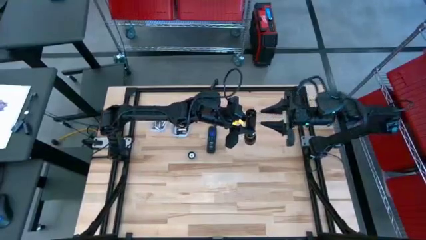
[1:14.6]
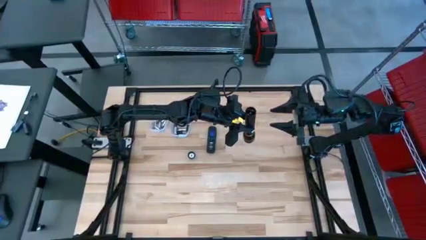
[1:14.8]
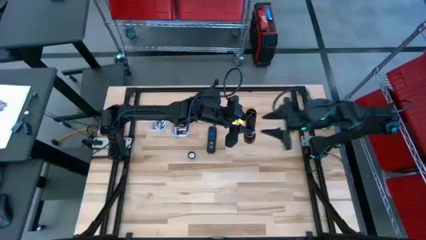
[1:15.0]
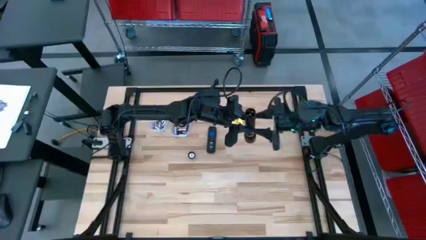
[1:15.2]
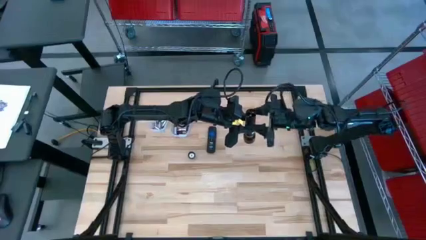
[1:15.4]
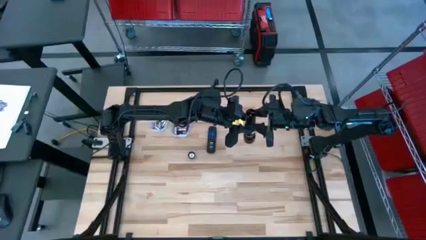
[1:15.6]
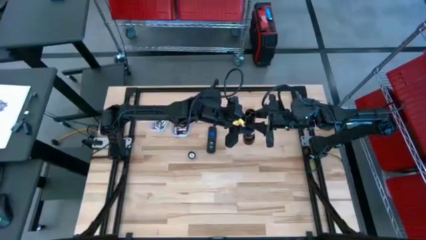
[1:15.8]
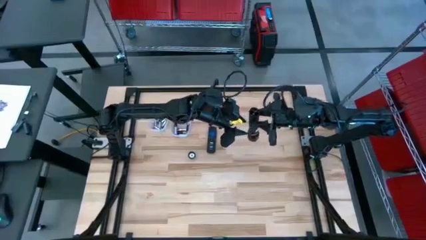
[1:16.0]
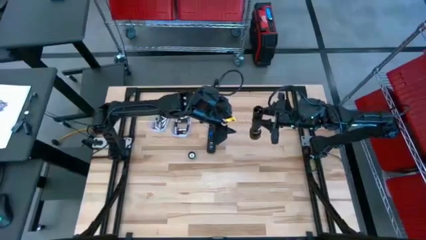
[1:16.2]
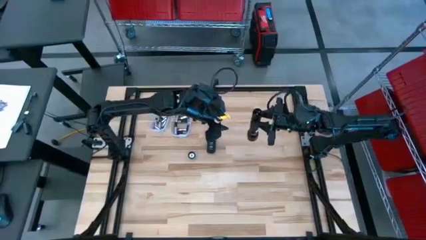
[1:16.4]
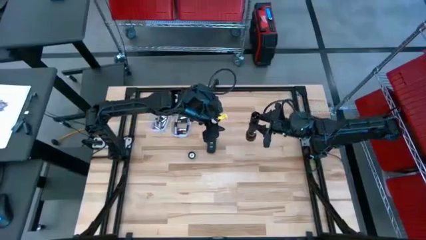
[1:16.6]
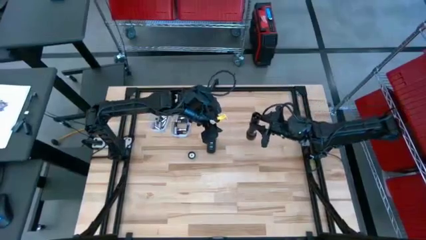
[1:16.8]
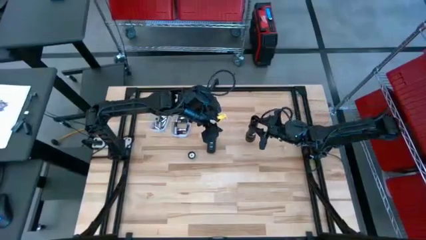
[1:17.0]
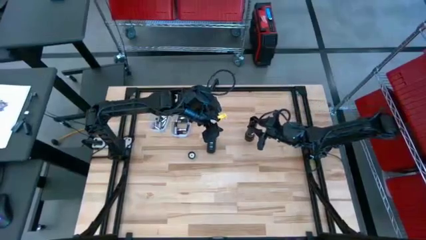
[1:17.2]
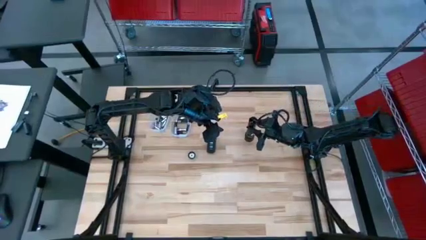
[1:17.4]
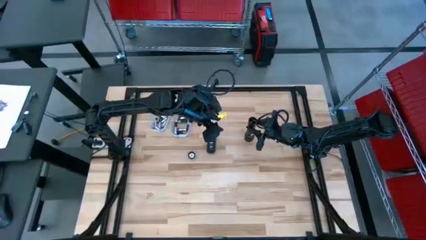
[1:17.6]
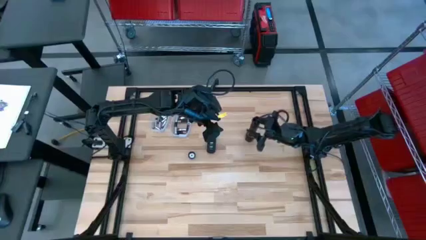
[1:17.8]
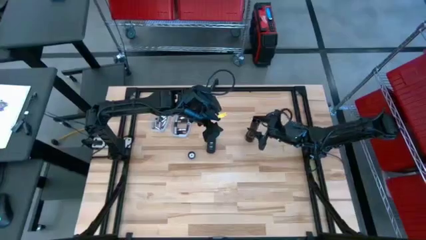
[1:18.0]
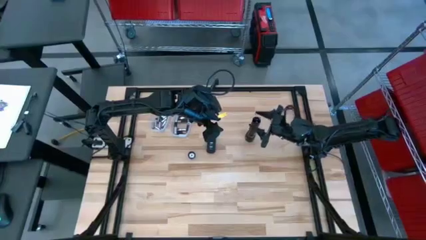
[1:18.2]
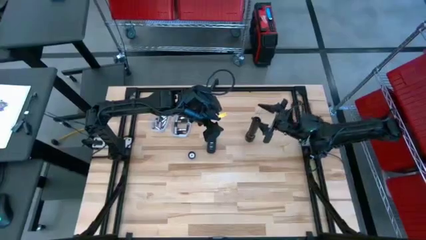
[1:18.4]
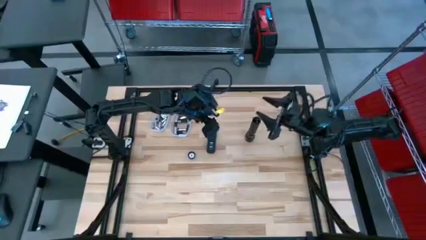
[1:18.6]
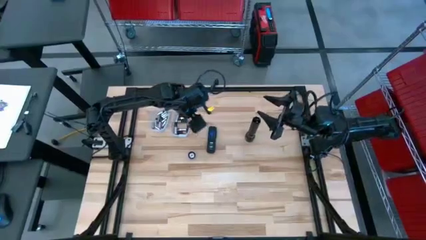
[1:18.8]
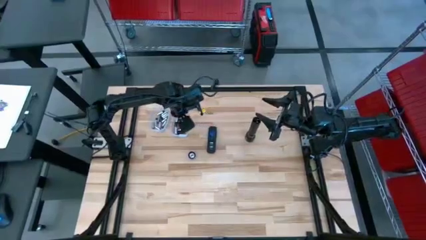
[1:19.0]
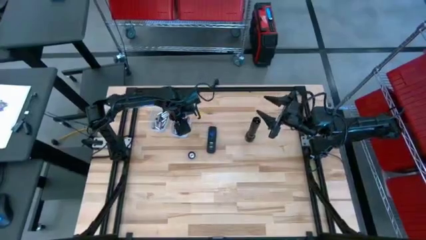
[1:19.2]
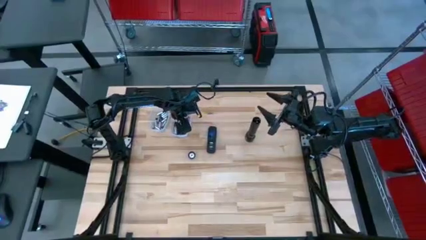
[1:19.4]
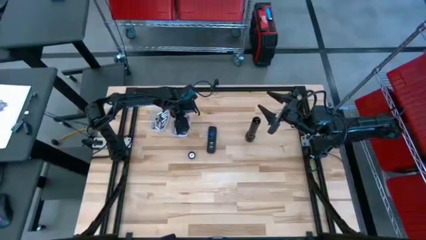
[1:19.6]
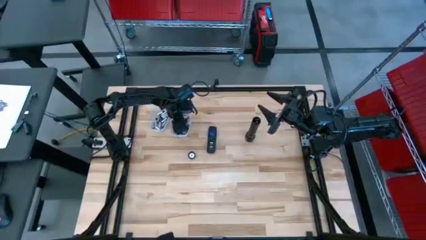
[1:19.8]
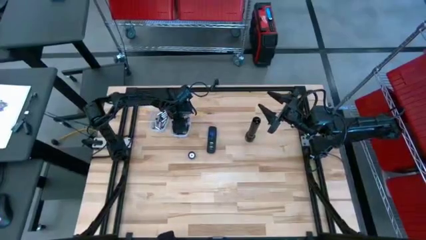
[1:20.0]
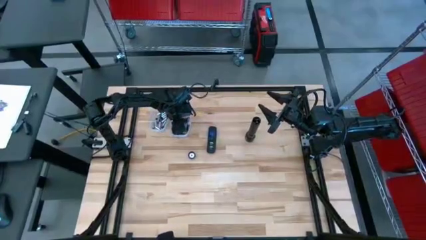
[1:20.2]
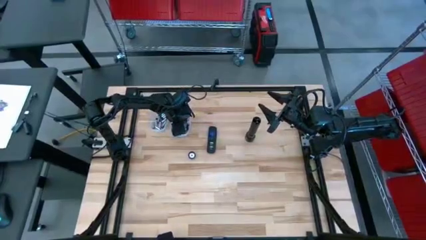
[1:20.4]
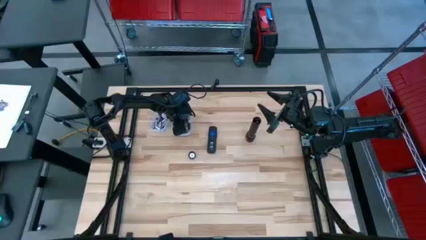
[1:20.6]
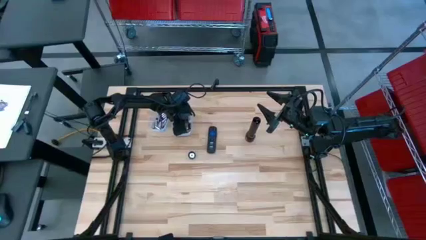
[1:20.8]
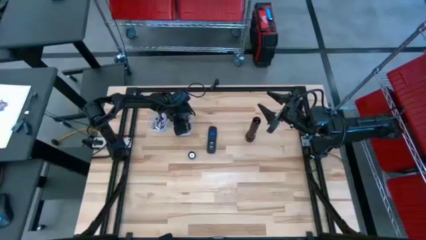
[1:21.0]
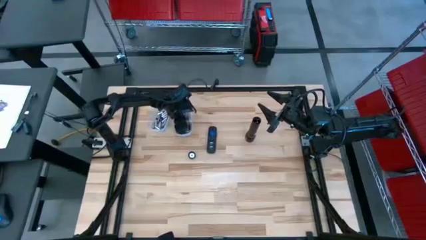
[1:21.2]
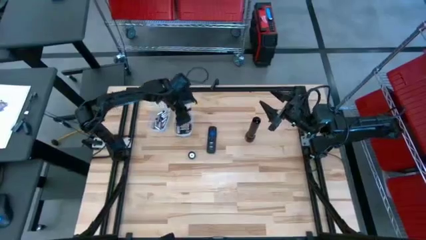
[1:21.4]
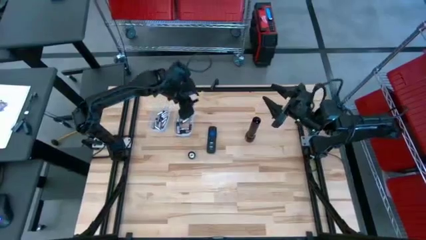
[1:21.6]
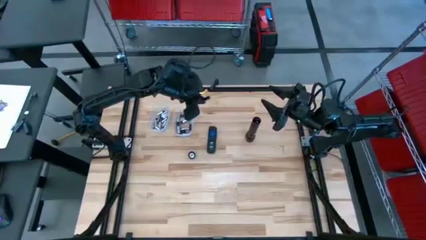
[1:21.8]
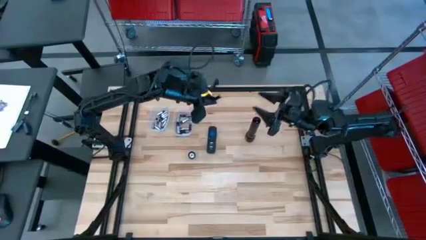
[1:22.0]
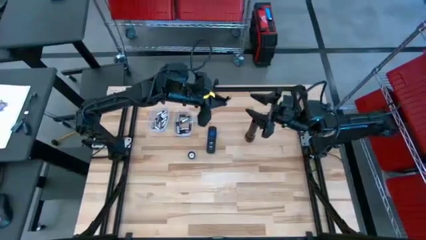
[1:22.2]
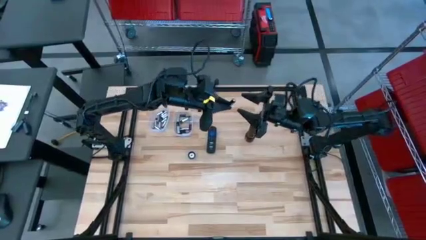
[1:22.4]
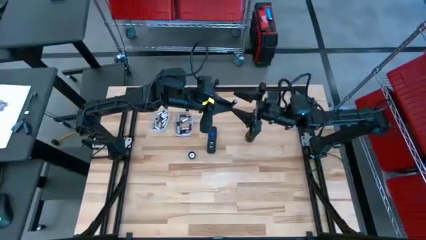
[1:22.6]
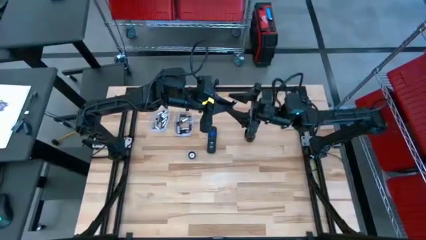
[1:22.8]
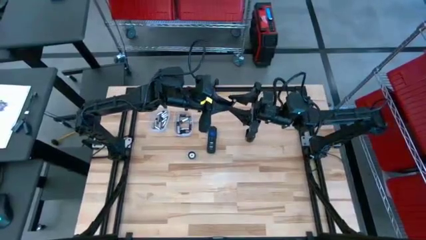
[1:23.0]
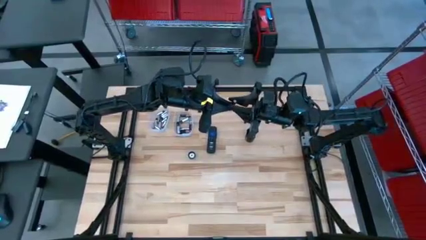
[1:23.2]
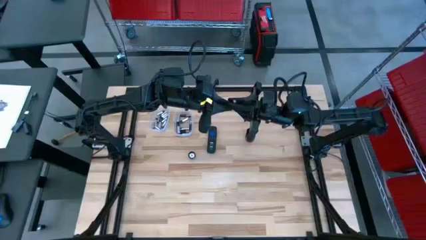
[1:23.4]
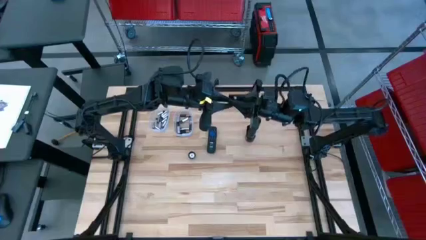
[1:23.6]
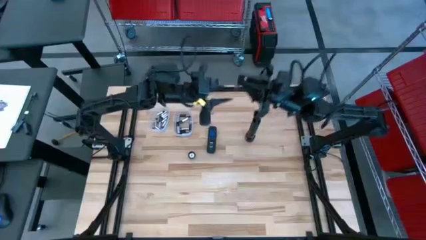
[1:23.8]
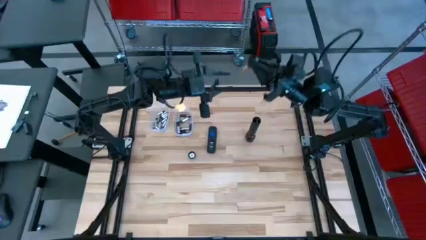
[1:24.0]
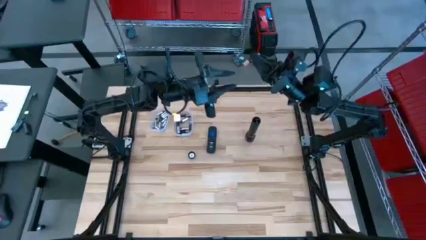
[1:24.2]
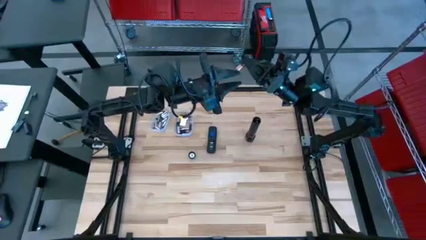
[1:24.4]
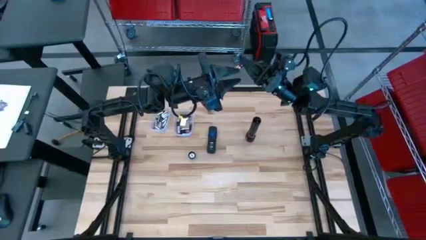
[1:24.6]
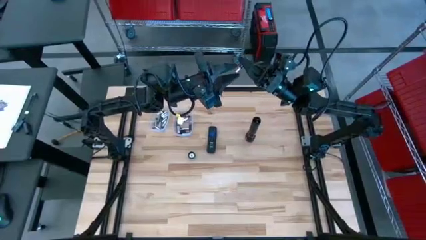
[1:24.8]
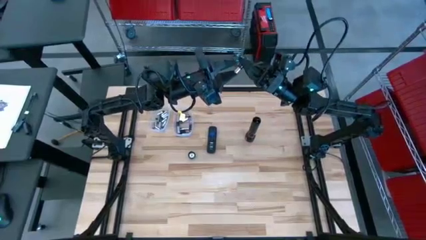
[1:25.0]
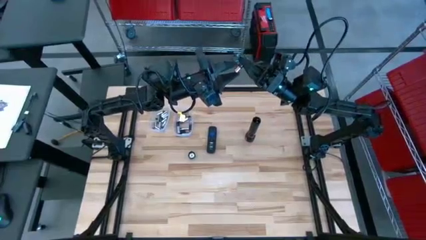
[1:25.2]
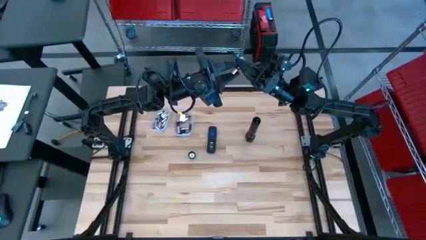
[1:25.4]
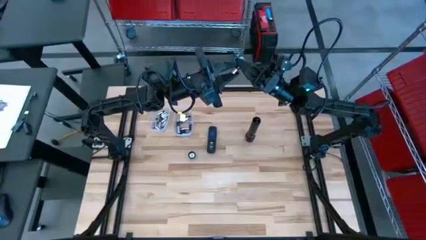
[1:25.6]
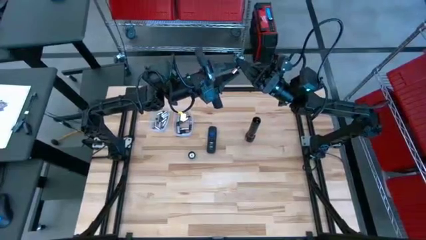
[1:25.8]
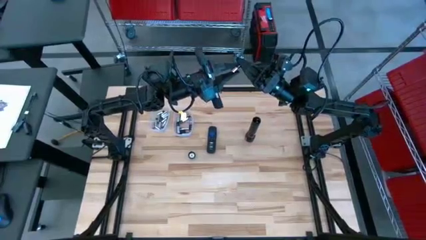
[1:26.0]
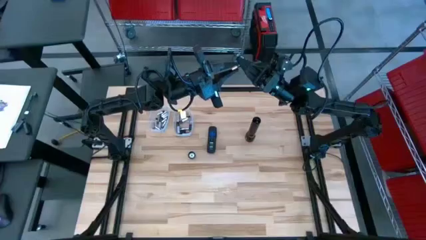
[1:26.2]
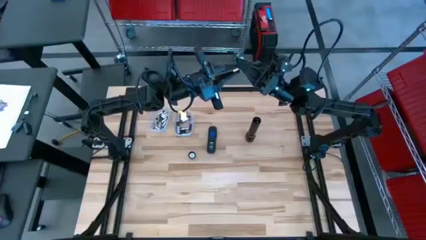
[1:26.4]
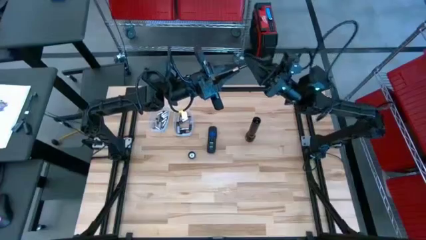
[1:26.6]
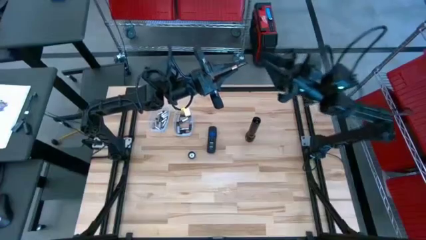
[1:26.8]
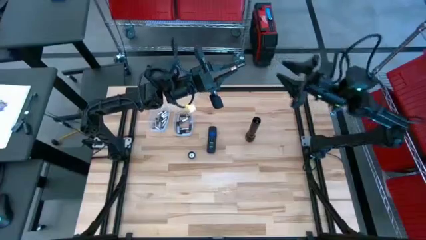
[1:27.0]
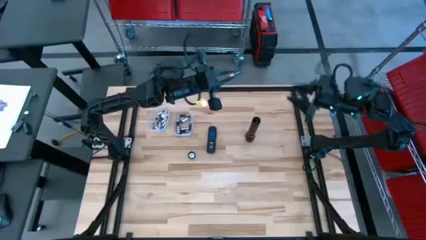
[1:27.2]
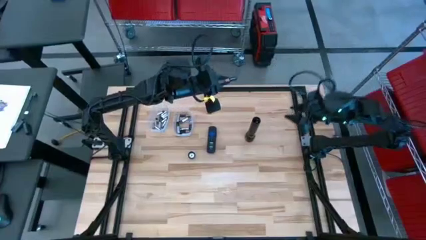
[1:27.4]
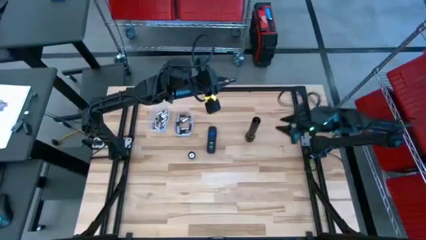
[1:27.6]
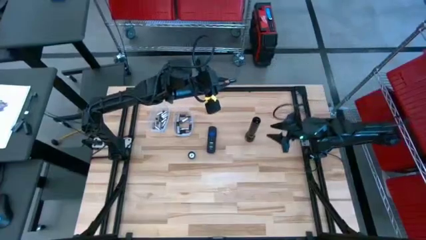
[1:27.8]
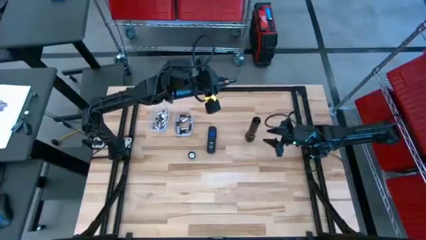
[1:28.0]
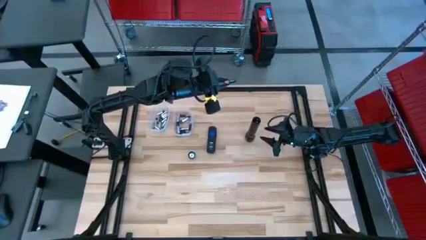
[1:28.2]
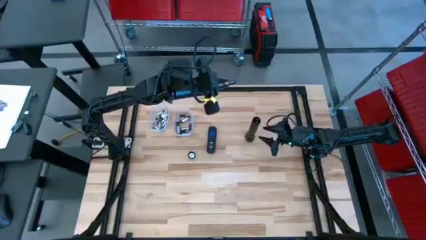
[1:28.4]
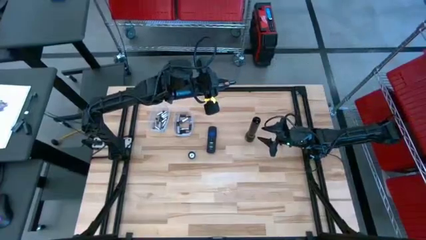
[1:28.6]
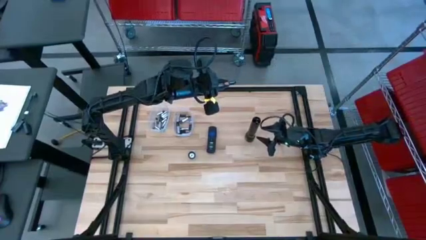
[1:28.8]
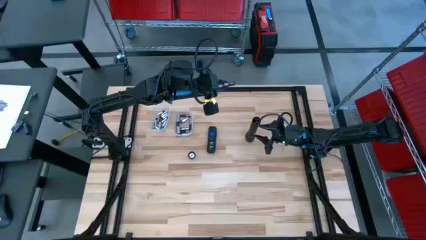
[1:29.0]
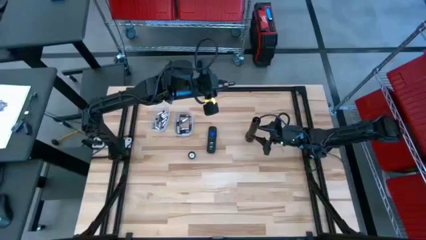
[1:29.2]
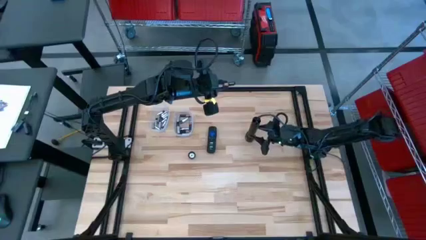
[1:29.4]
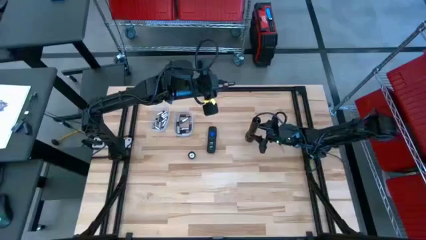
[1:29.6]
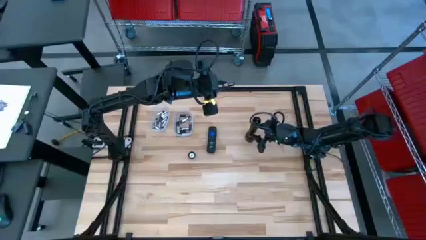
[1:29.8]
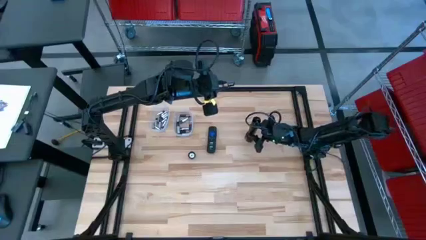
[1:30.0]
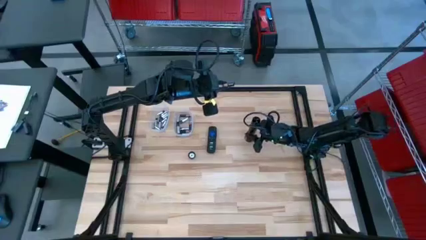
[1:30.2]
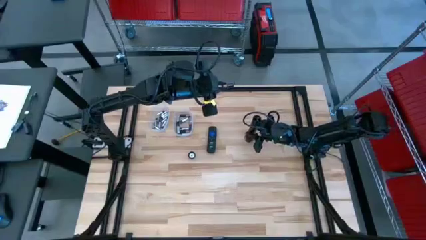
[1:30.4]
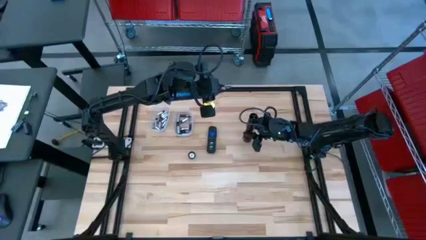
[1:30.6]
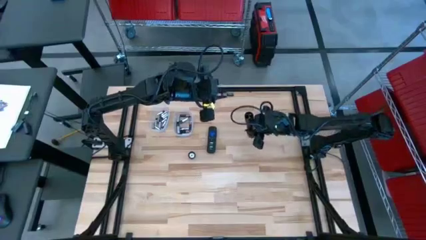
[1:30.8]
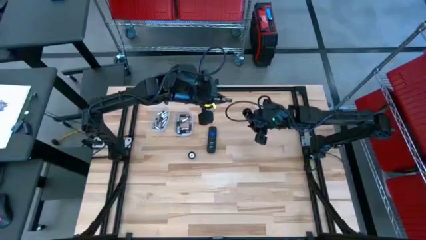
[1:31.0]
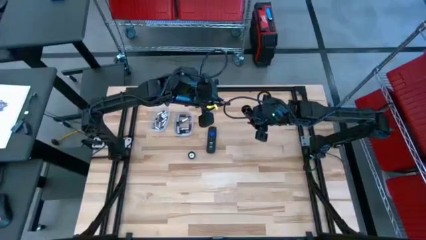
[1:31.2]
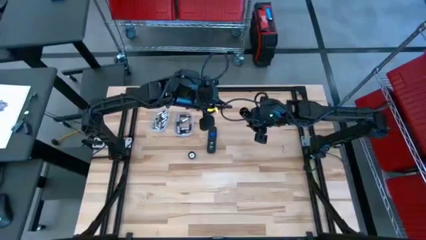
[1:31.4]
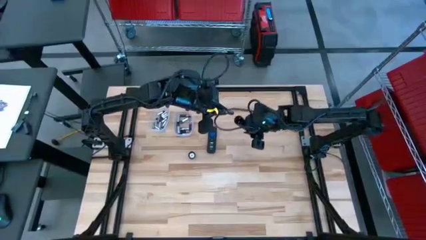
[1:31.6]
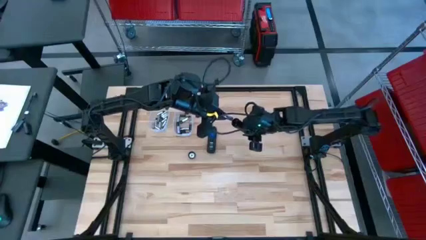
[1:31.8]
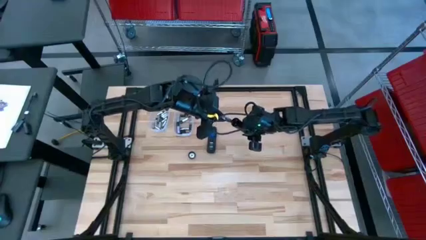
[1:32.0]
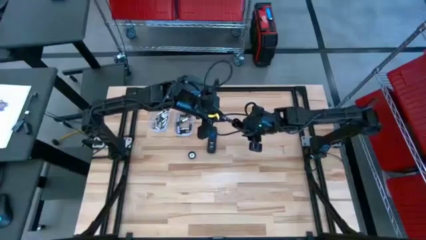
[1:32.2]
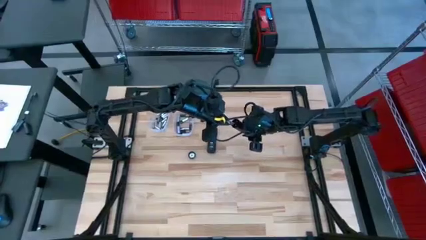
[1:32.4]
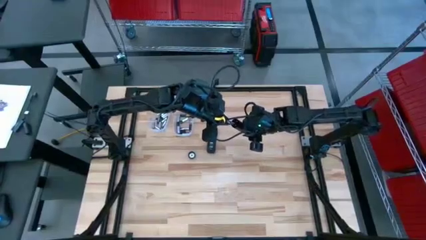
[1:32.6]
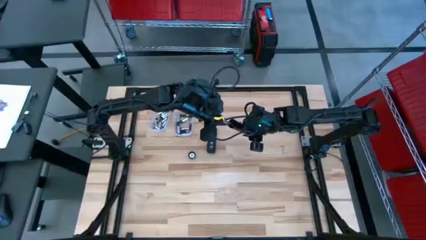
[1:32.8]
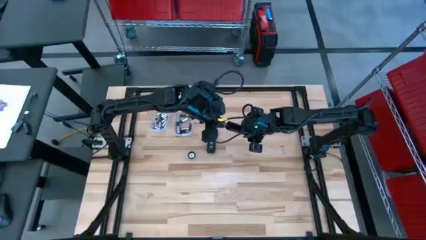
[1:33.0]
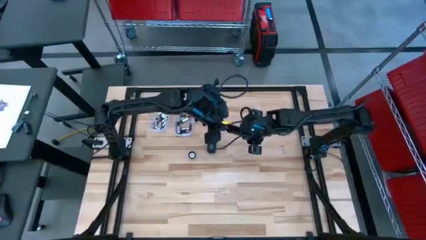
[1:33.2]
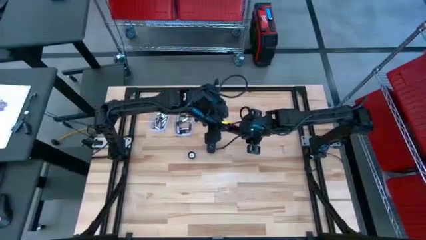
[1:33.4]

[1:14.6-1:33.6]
Task: Insert battery
Insert the brown battery into the flashlight battery compartment
